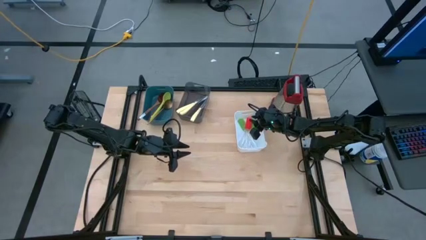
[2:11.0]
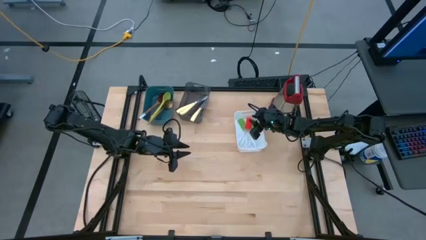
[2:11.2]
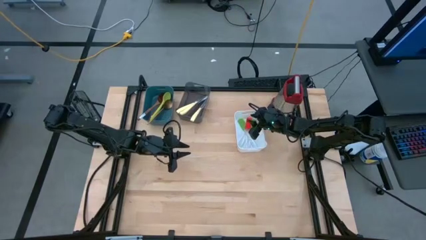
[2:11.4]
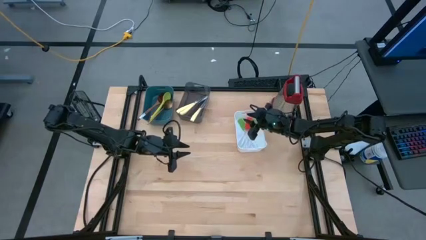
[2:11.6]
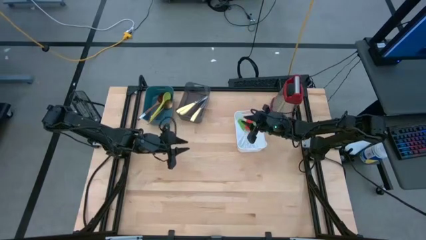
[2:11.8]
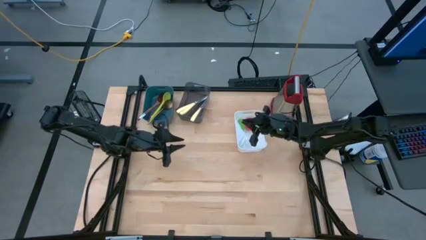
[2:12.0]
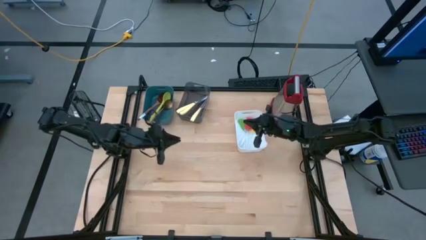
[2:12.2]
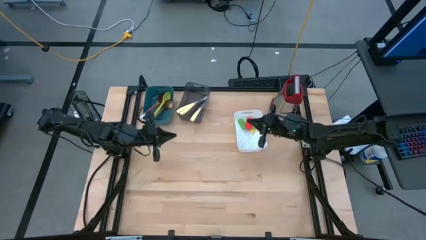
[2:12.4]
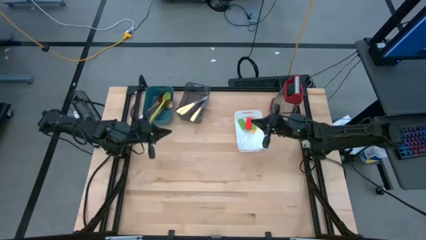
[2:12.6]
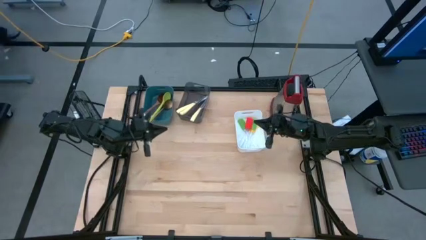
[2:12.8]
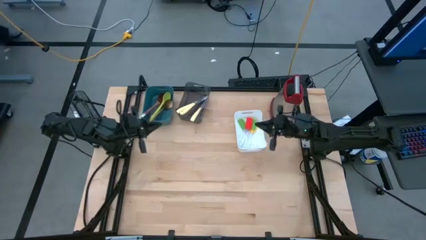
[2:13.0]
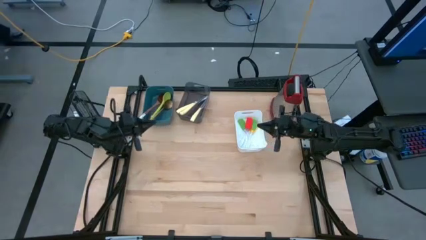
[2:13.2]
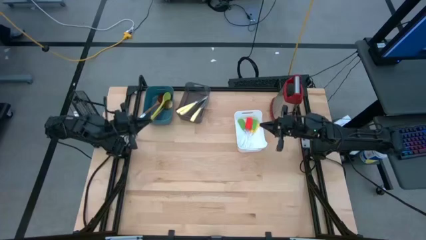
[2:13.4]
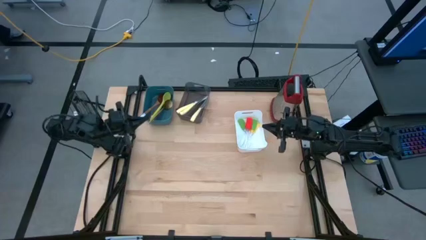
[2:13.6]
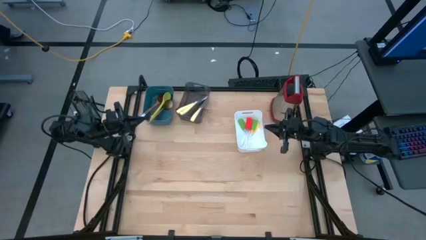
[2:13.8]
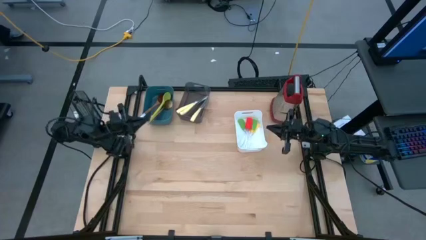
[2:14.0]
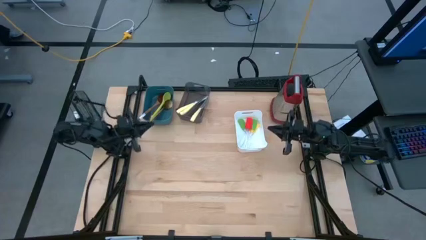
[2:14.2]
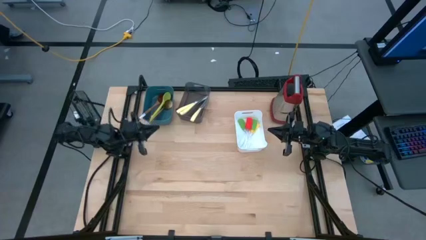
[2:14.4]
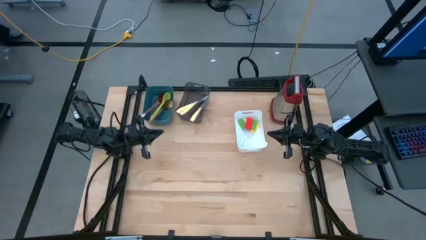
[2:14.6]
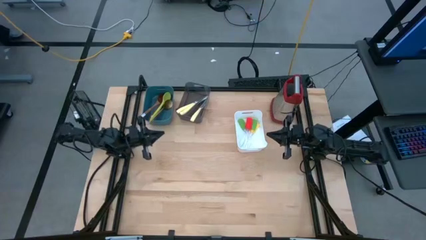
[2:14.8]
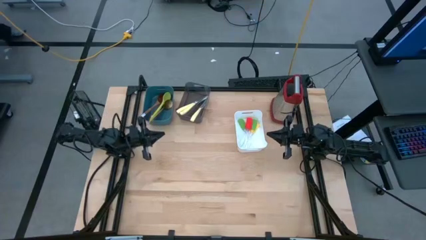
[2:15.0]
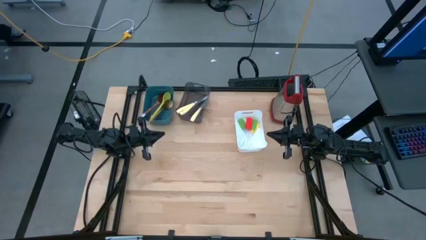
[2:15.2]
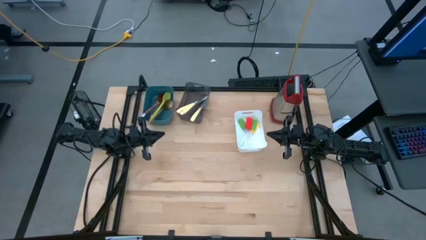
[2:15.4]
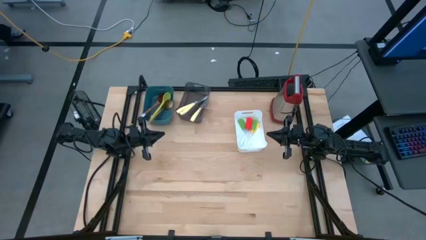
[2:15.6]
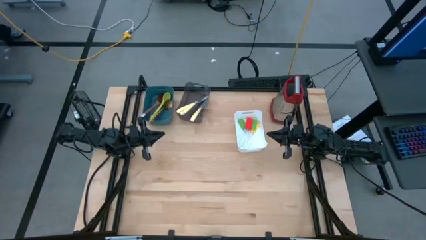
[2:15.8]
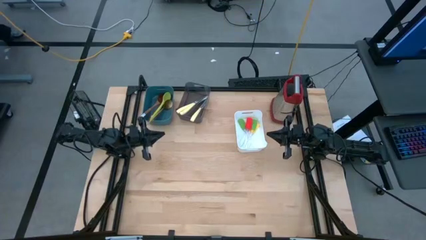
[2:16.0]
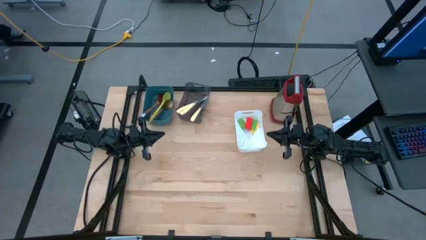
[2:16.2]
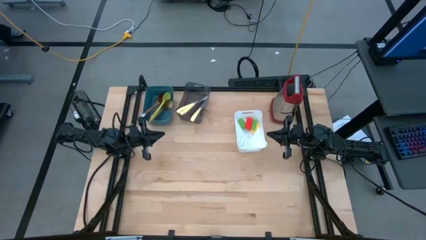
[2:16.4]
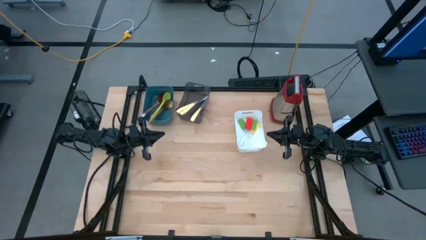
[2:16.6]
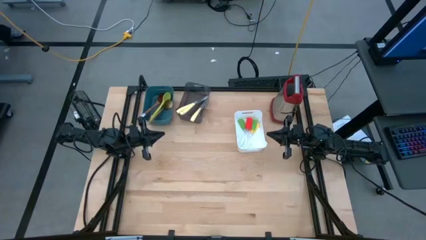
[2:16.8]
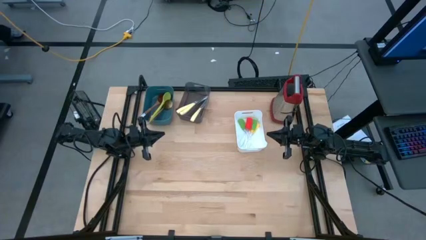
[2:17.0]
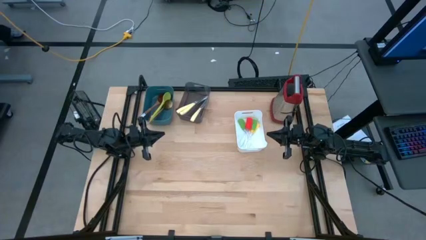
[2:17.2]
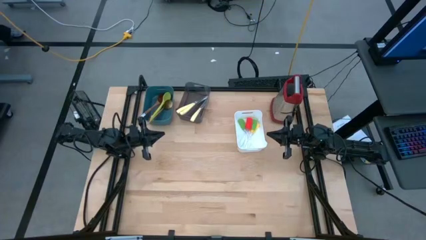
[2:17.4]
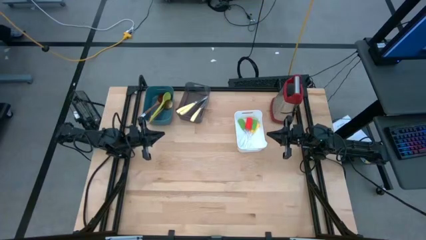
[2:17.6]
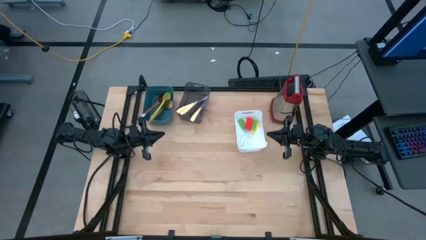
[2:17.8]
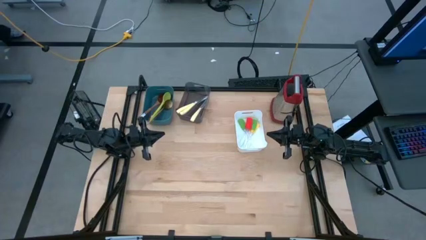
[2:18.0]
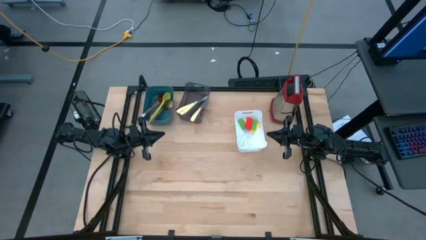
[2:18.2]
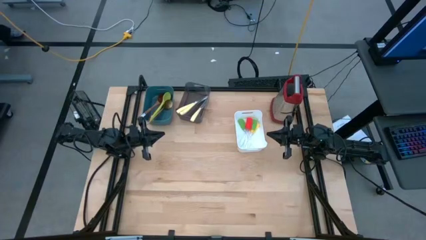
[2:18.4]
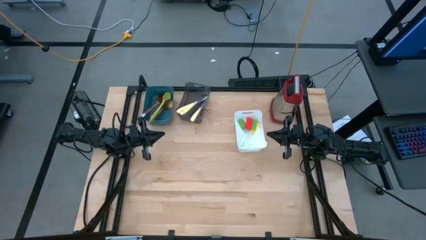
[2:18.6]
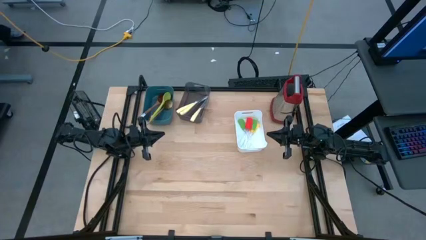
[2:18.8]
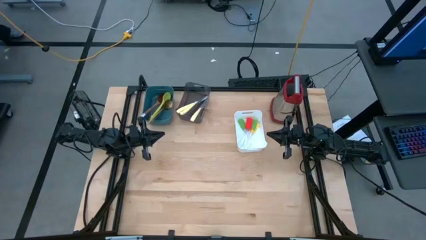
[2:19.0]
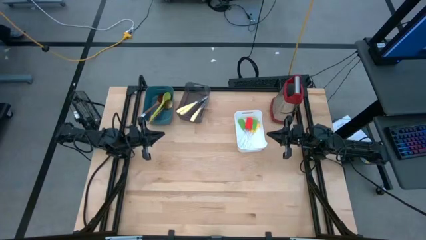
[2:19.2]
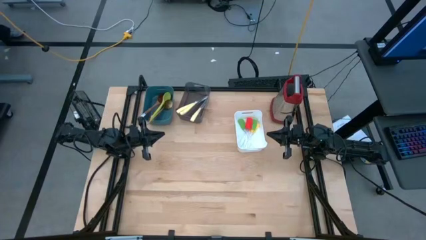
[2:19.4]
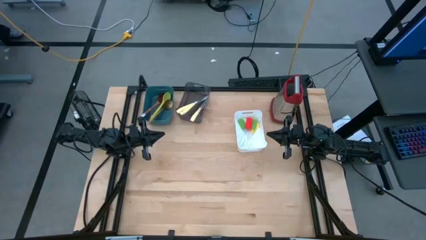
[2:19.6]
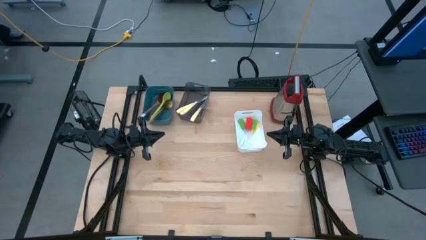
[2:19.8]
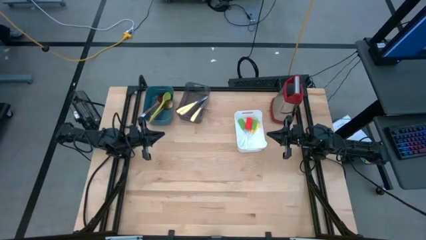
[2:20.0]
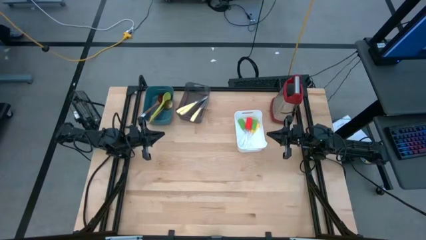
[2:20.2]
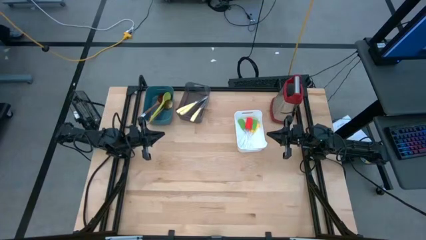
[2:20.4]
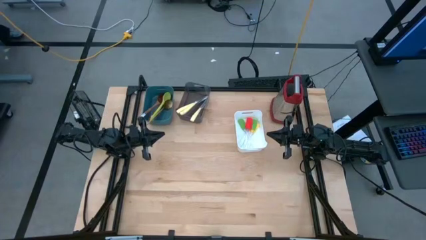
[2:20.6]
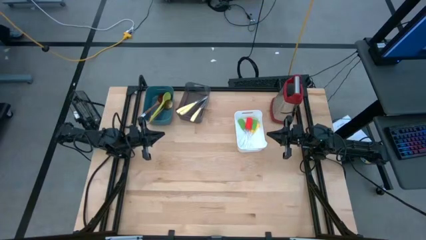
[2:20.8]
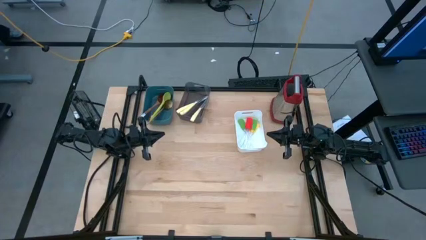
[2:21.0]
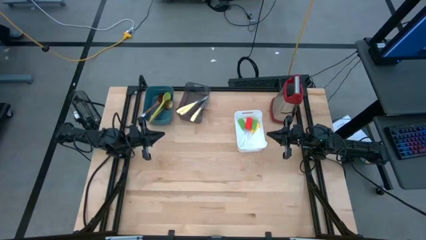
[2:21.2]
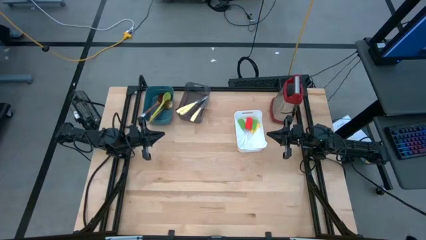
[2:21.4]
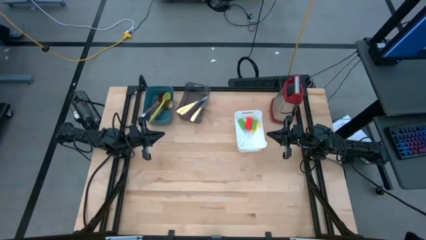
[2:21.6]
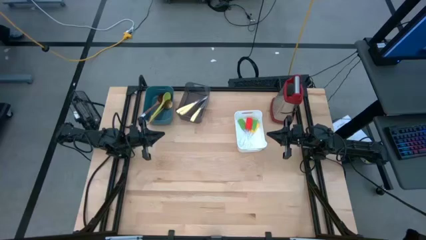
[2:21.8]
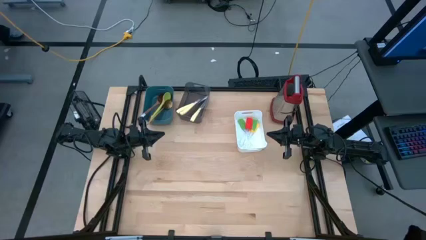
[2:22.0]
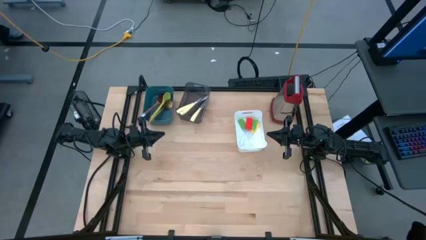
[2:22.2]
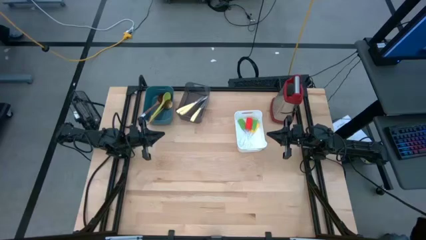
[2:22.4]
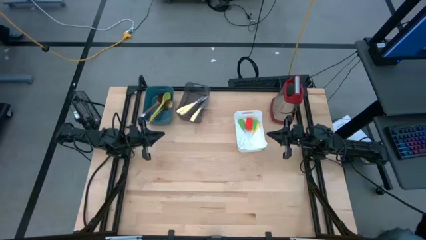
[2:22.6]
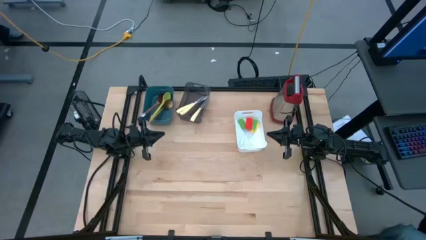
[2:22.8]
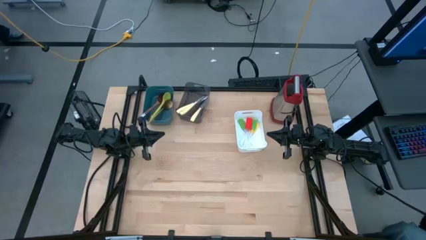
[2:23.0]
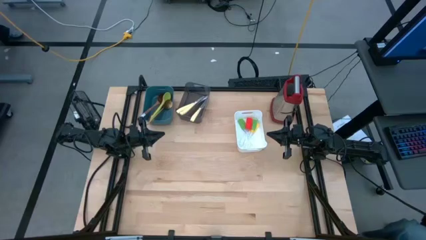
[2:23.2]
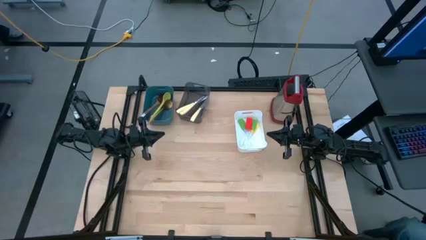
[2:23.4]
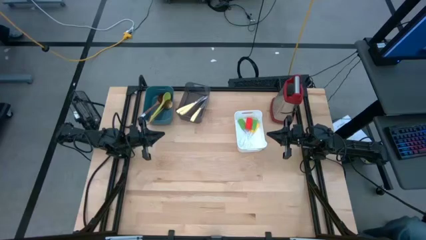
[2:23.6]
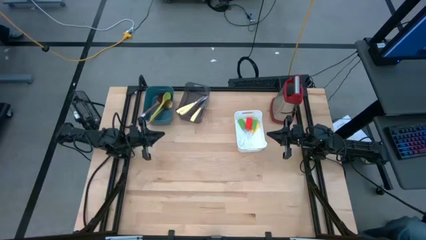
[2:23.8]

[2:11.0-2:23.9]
Task: Pick & Place Kitchen Items
Return to Home Position

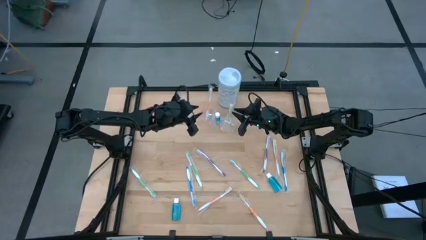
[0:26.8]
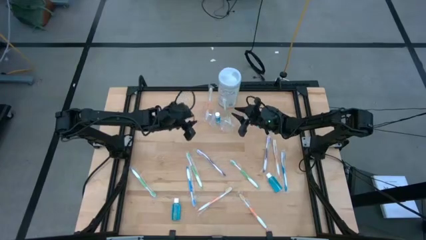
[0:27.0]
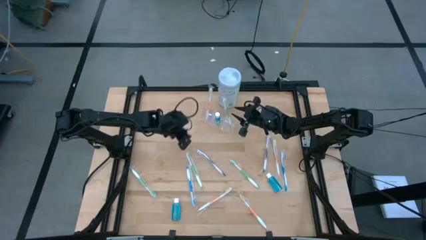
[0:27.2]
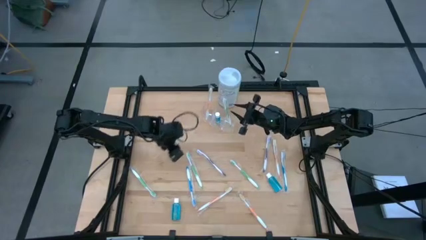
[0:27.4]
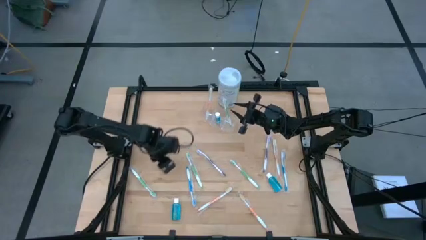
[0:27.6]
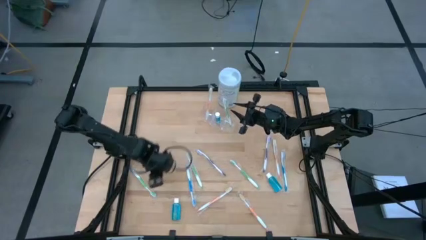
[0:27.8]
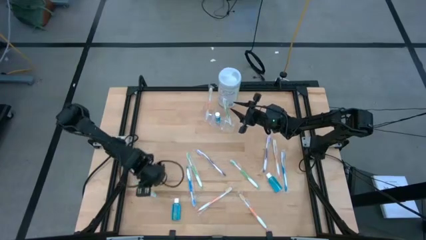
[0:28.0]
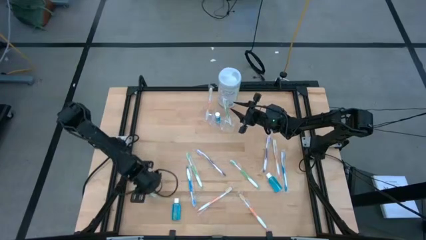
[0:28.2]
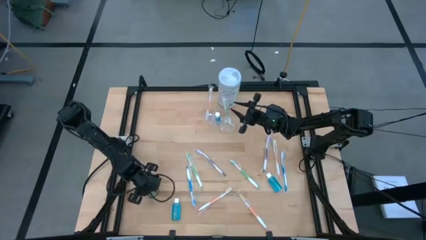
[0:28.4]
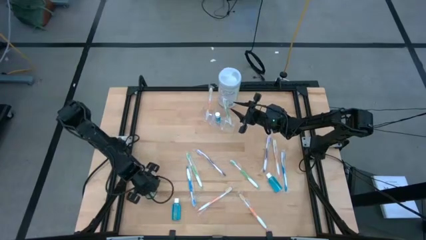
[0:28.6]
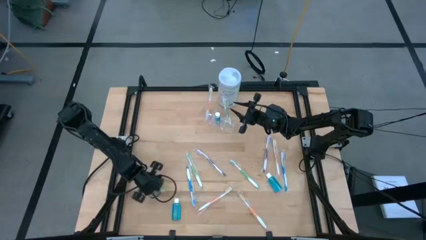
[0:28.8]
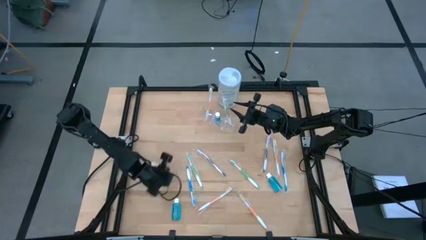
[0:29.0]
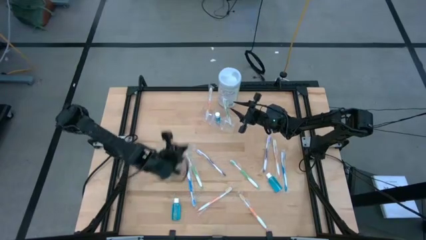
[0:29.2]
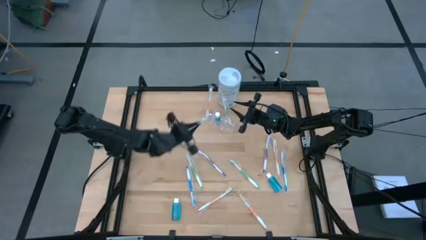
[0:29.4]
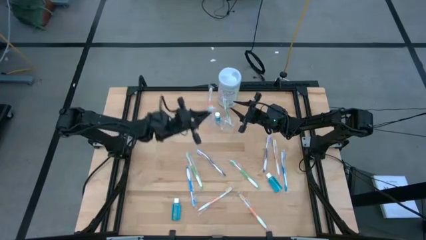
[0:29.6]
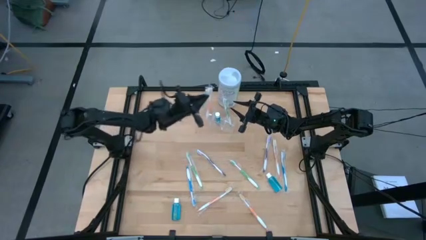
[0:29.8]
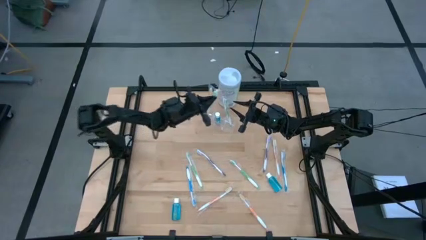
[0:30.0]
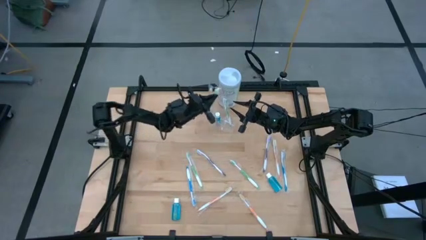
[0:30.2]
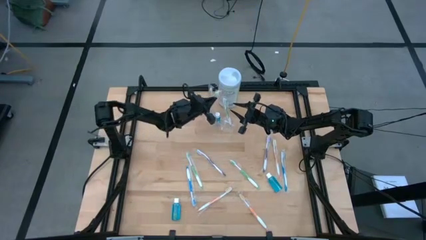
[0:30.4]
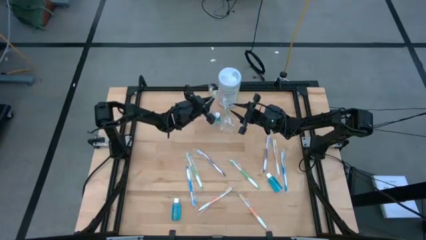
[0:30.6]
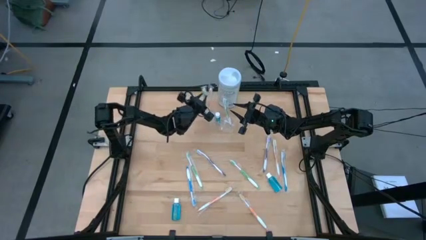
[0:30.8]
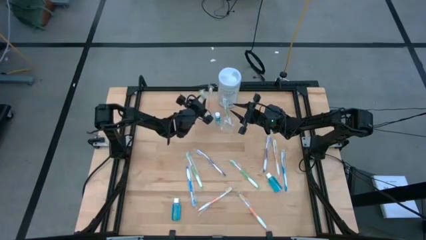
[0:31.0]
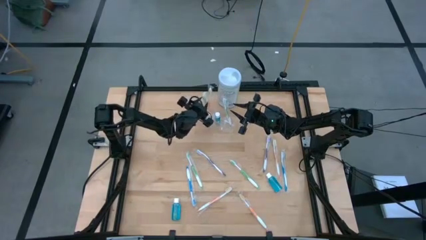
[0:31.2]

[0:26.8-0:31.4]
Task: Pick & Place toothbrushing station
Put the green toothbrush into the transparent organizer
